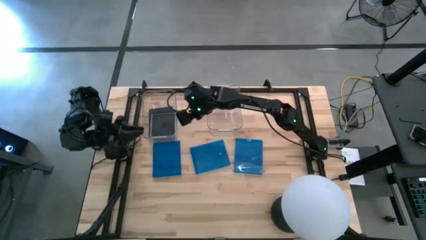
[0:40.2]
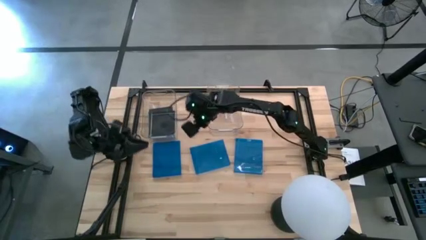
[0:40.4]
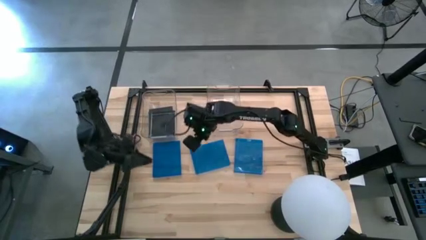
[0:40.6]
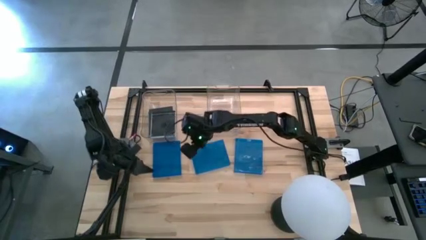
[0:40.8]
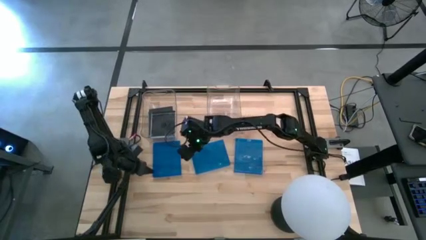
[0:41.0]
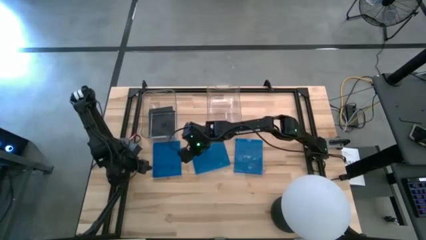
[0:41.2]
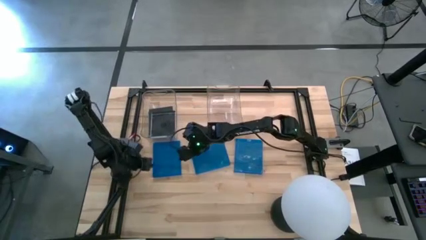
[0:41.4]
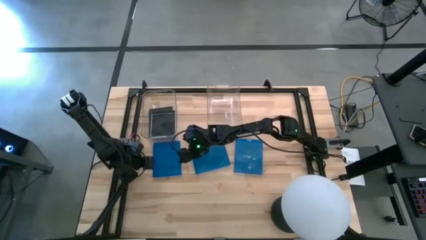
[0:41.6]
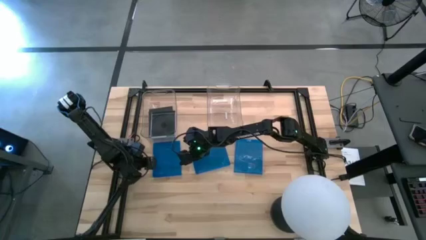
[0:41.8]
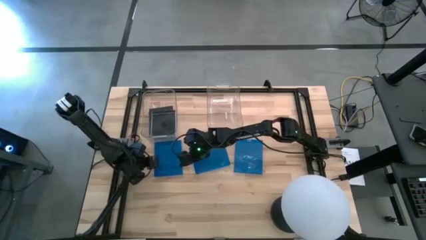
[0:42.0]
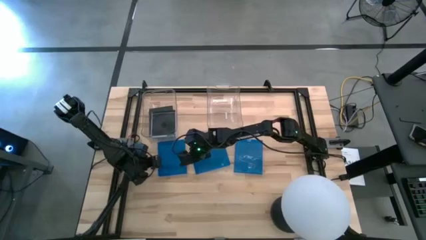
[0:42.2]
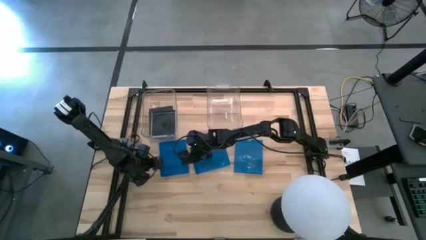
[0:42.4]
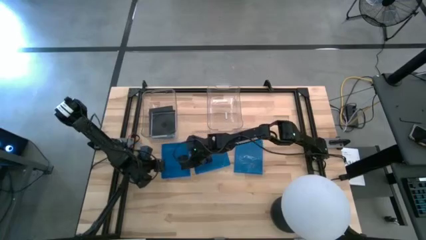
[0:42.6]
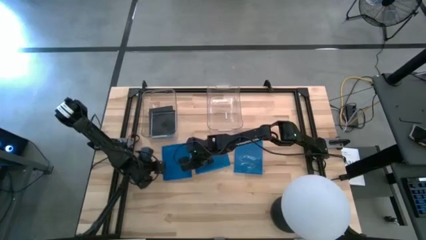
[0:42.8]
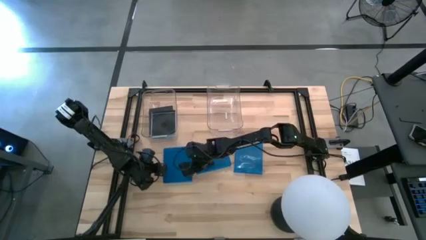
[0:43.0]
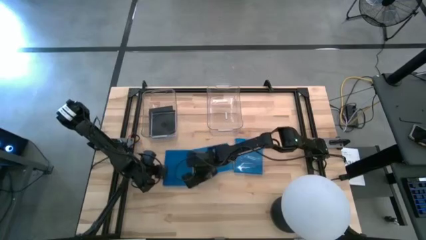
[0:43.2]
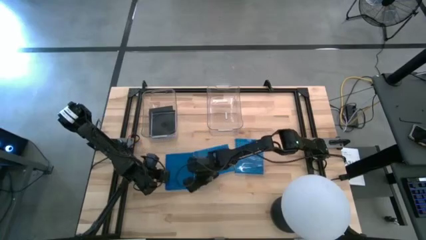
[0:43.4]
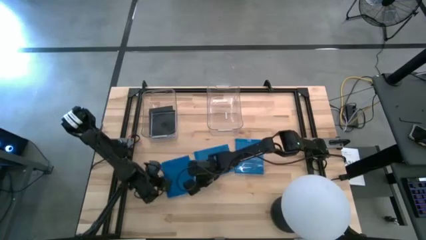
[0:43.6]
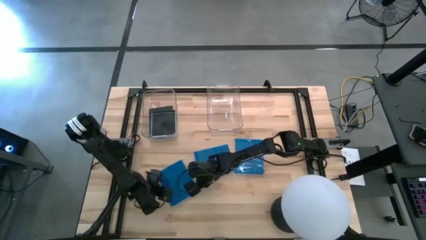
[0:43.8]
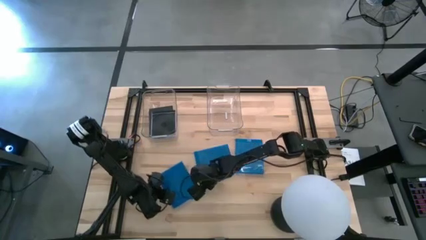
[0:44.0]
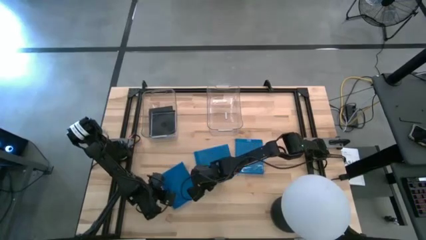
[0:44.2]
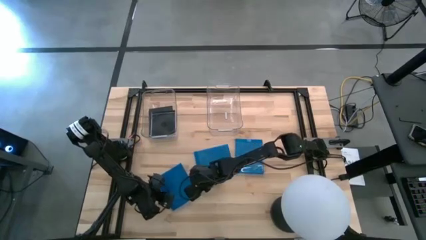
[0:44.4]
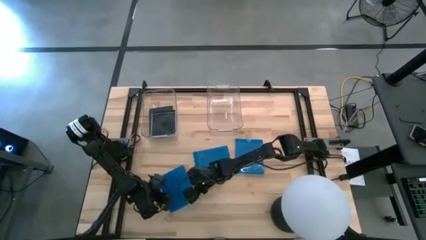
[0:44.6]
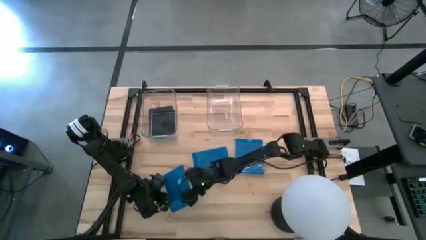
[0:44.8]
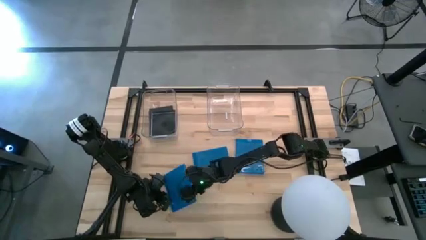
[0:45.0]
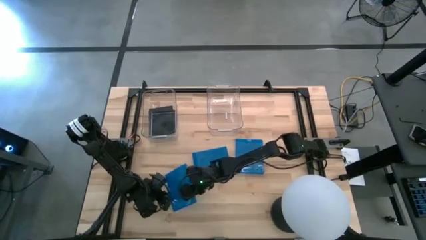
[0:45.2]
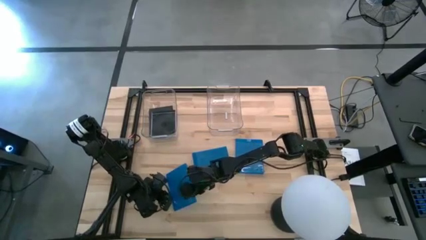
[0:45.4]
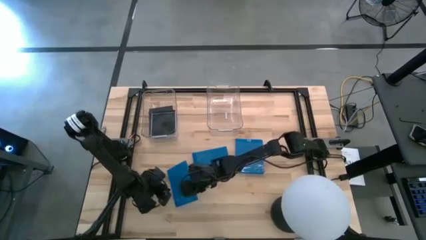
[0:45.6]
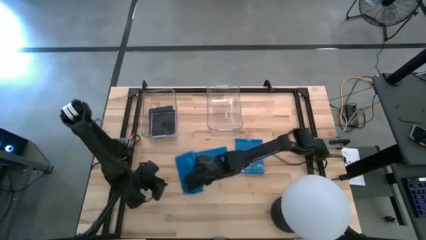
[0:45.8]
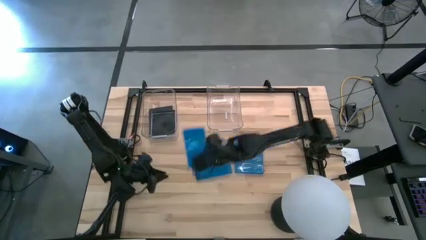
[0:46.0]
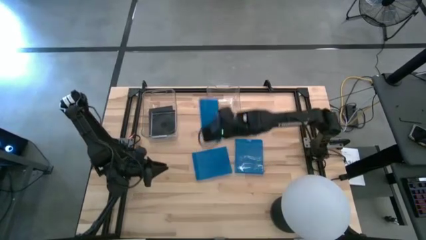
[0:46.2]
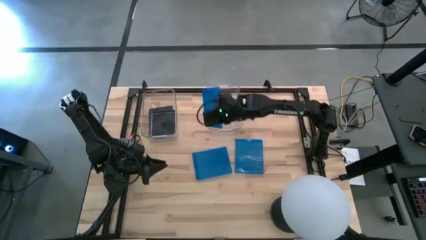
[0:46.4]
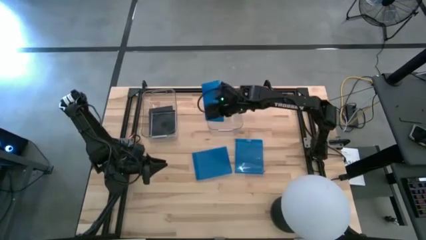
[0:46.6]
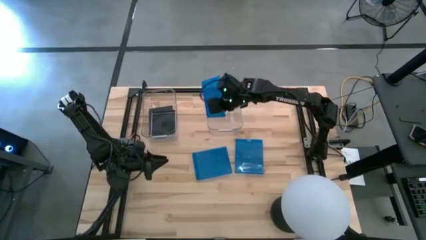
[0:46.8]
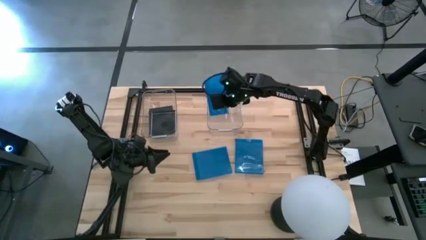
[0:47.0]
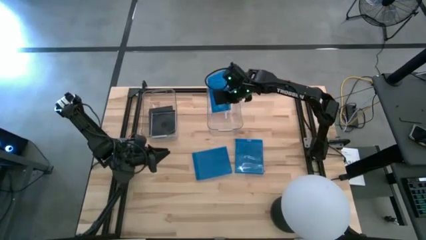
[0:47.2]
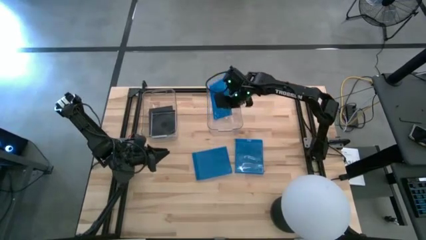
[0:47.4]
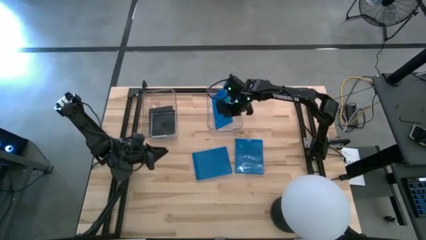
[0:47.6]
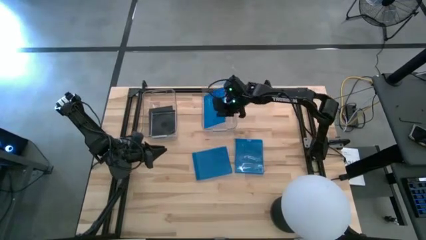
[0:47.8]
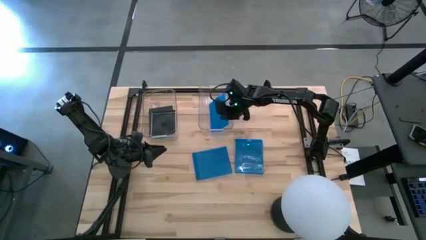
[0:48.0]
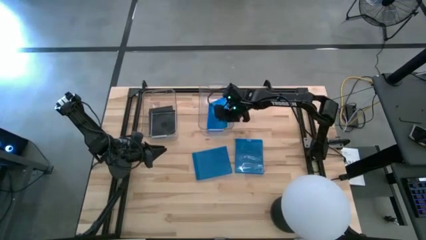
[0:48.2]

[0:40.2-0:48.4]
Task: Pick & place jewel cases by type
Put the blue CD case into the right transparent bin

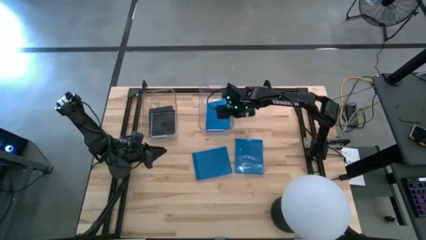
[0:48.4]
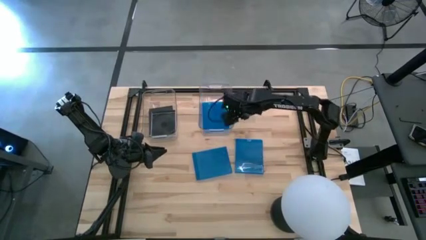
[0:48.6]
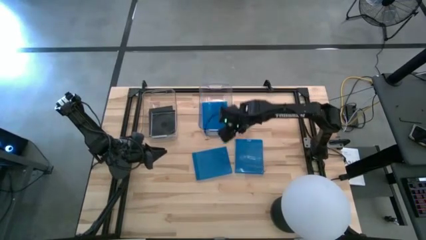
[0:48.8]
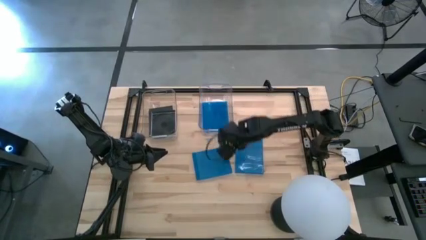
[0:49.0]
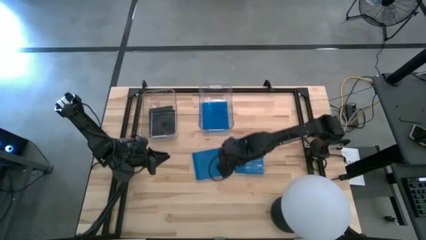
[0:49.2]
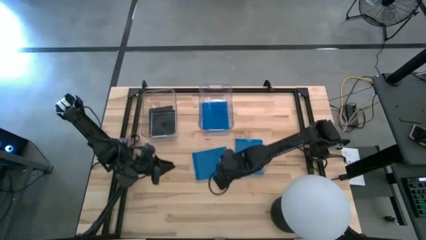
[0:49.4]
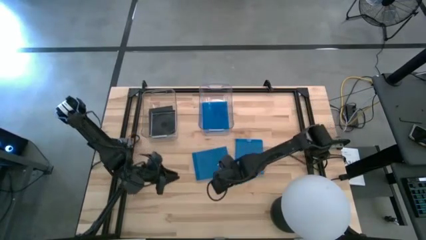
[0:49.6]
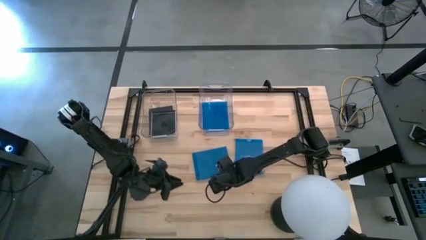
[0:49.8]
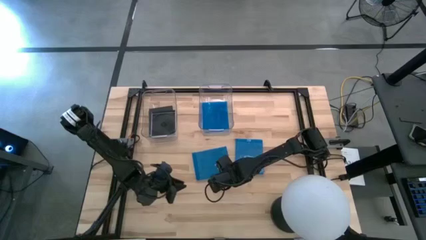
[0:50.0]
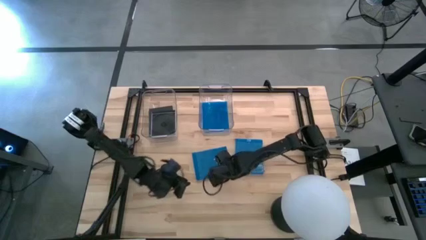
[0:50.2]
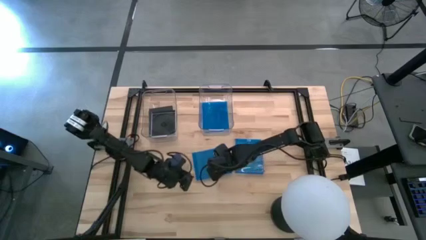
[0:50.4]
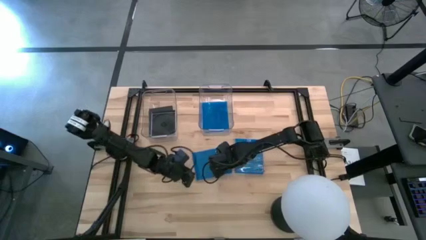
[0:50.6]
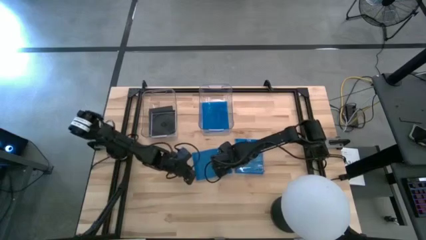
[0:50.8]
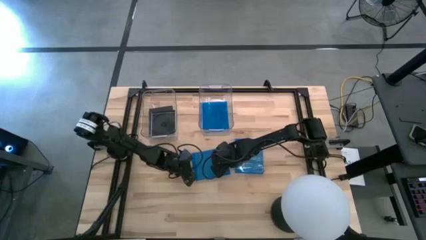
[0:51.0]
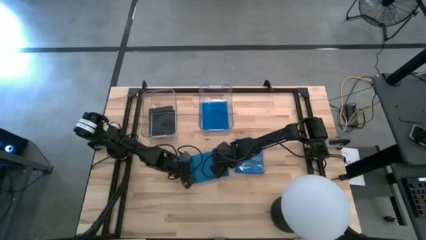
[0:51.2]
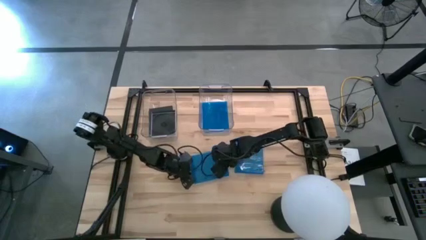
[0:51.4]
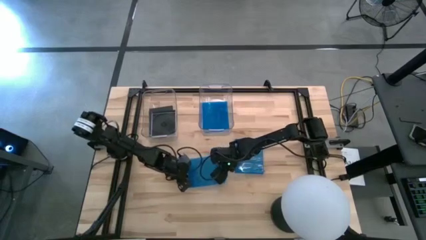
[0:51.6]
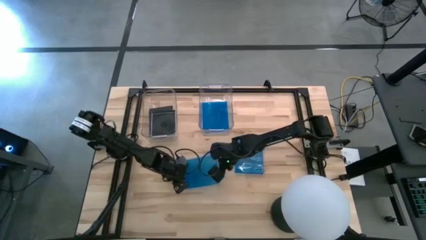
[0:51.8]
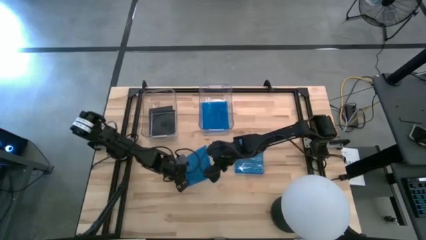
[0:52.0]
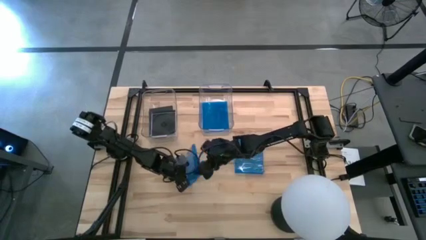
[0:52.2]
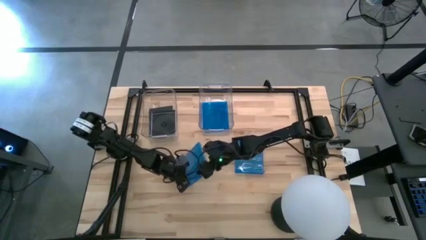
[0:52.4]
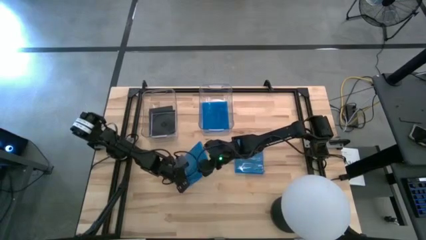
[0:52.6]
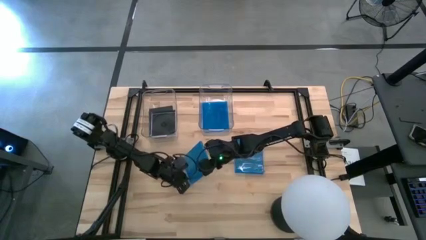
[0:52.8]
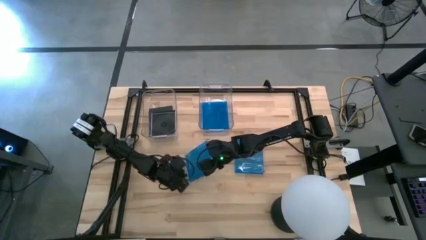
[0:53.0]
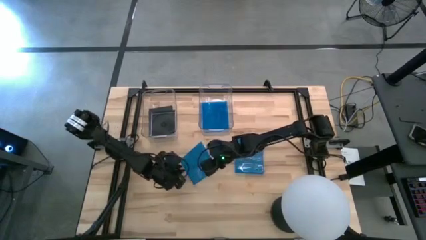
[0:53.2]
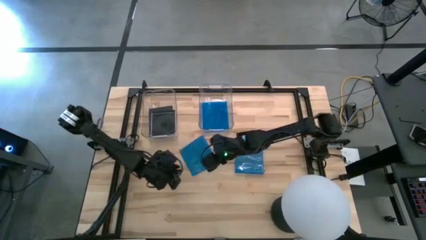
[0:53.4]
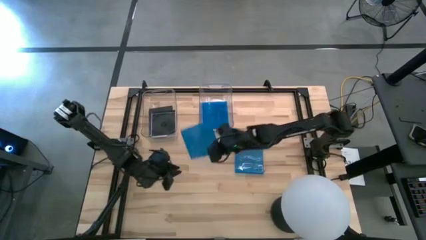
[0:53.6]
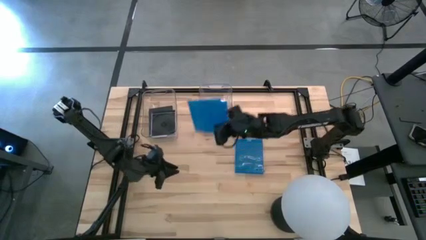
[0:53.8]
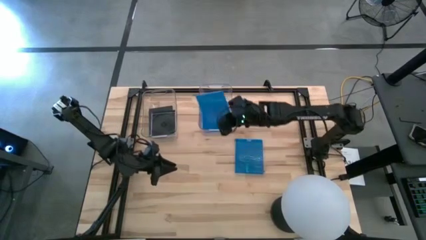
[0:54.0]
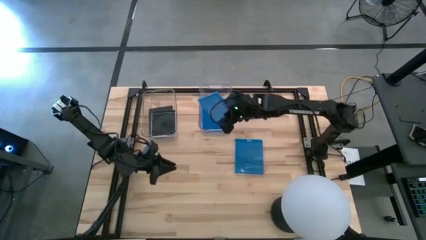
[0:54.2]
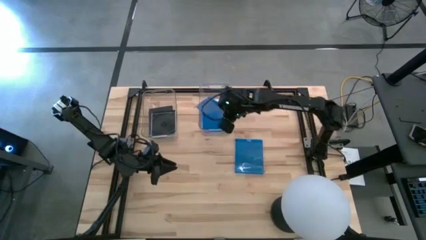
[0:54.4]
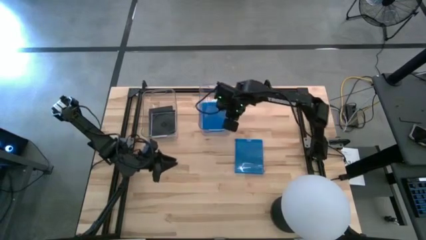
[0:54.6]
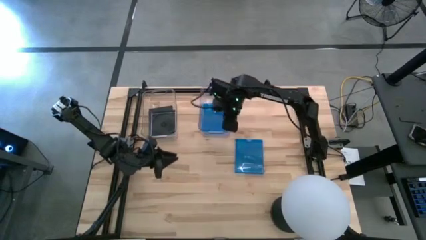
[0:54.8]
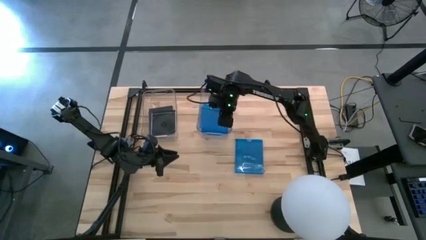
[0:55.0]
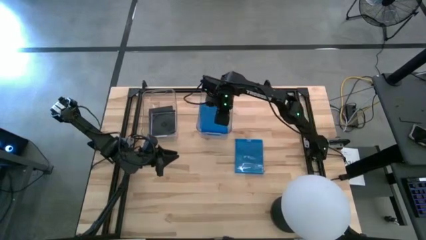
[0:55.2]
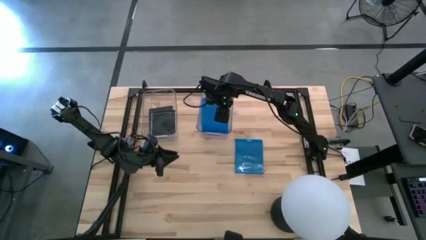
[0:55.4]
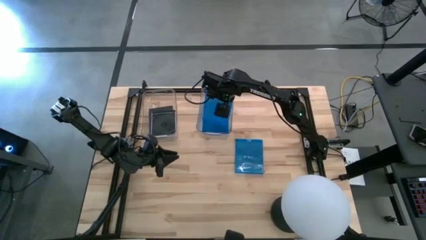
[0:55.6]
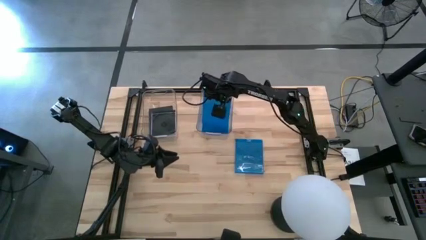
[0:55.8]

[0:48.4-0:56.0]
Put the blue CD case into the right transparent bin
